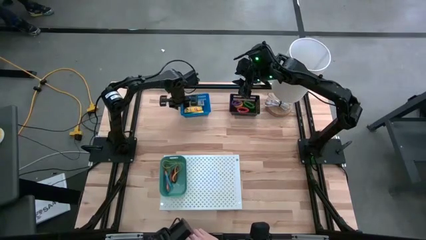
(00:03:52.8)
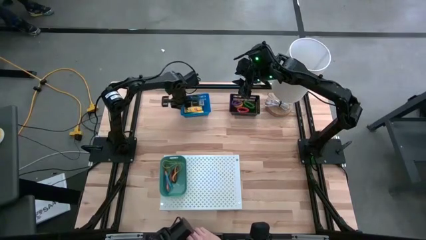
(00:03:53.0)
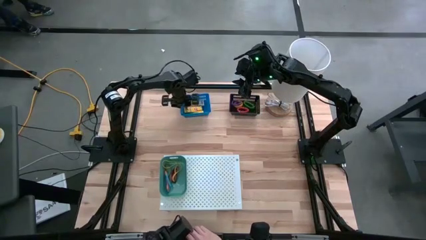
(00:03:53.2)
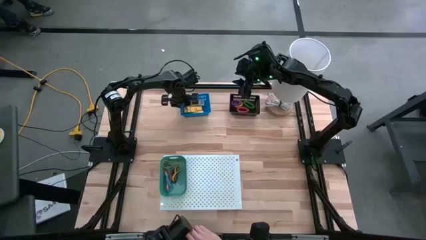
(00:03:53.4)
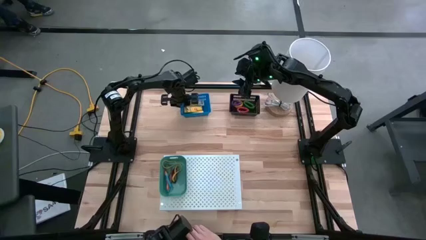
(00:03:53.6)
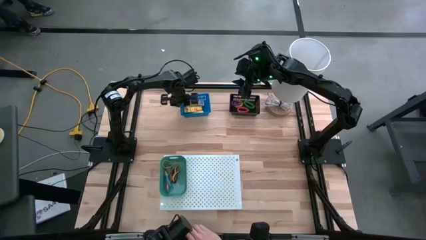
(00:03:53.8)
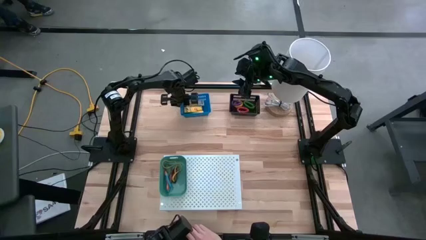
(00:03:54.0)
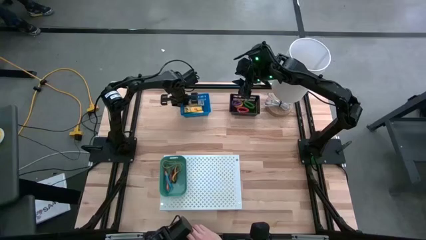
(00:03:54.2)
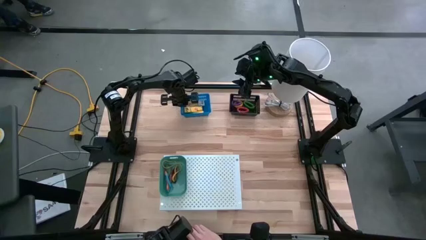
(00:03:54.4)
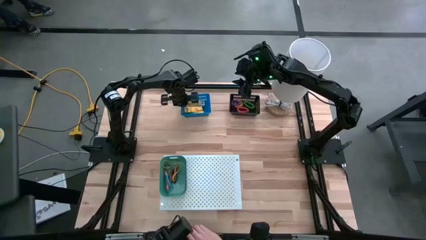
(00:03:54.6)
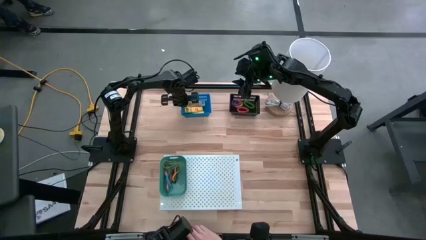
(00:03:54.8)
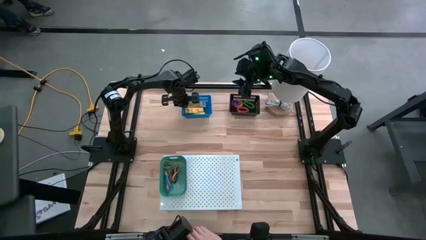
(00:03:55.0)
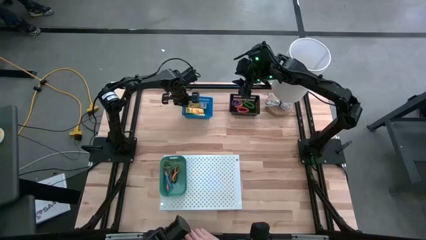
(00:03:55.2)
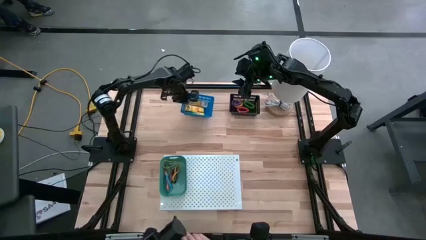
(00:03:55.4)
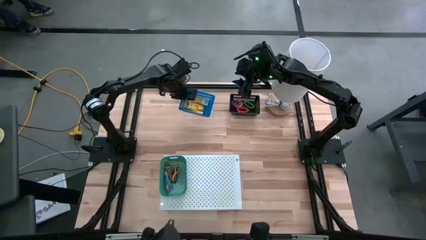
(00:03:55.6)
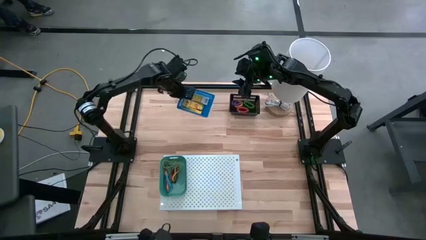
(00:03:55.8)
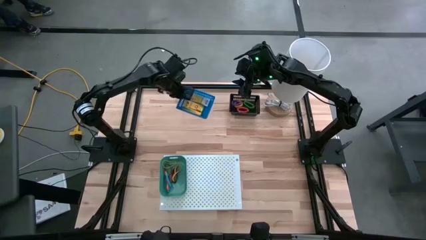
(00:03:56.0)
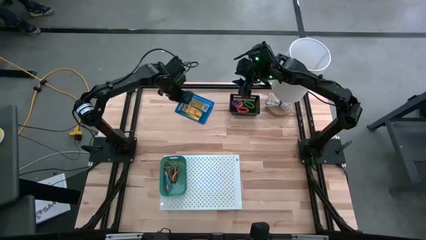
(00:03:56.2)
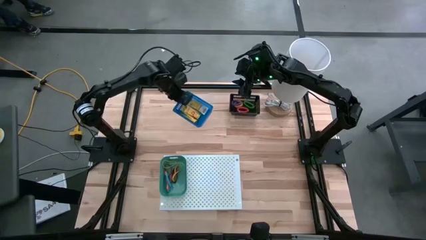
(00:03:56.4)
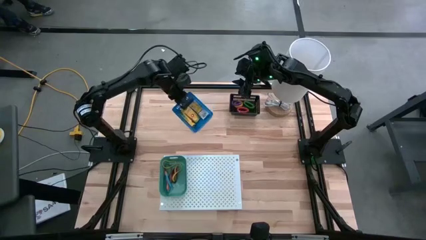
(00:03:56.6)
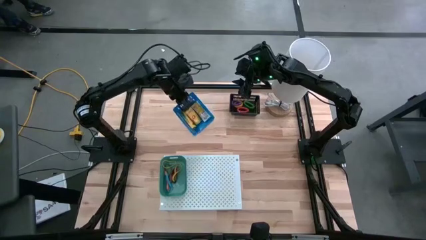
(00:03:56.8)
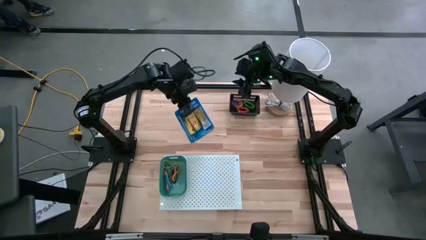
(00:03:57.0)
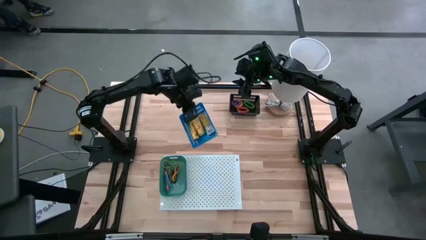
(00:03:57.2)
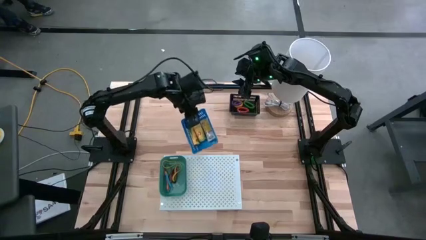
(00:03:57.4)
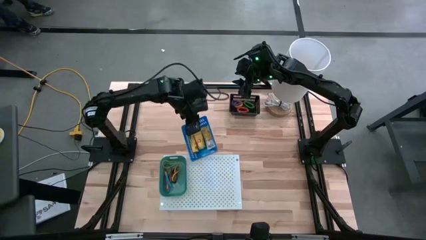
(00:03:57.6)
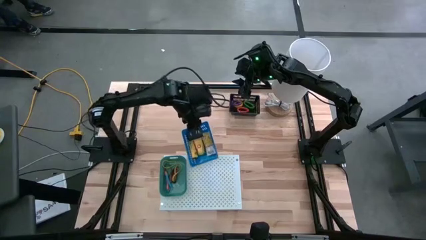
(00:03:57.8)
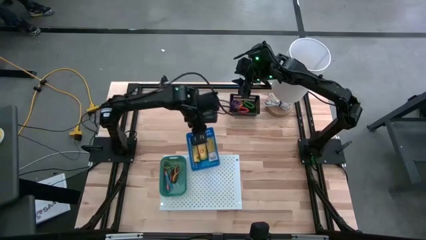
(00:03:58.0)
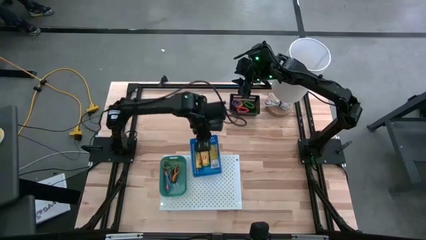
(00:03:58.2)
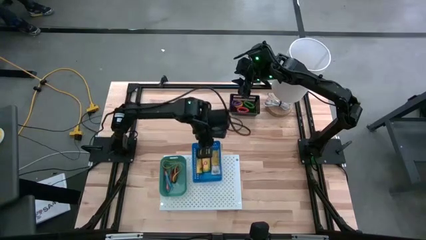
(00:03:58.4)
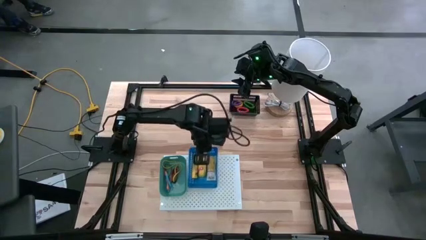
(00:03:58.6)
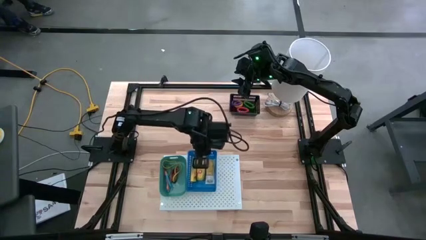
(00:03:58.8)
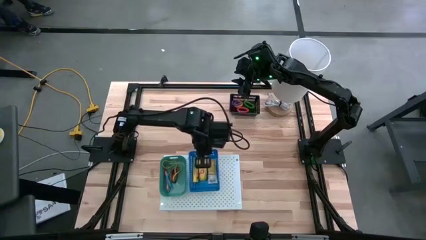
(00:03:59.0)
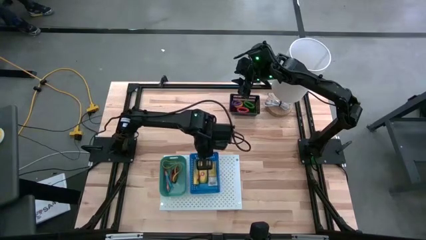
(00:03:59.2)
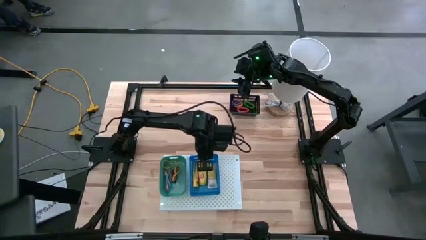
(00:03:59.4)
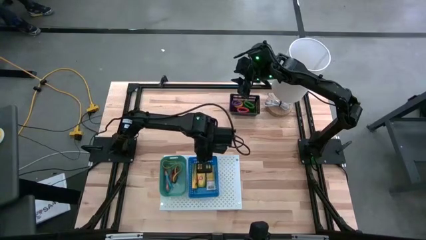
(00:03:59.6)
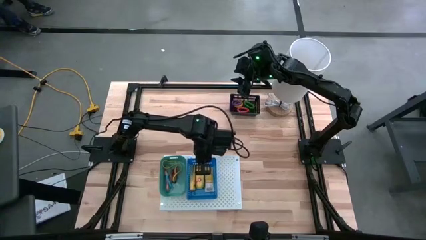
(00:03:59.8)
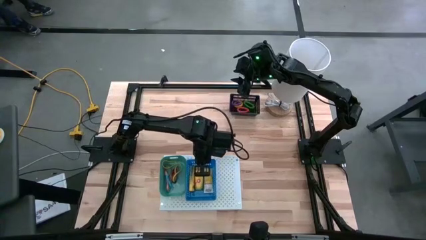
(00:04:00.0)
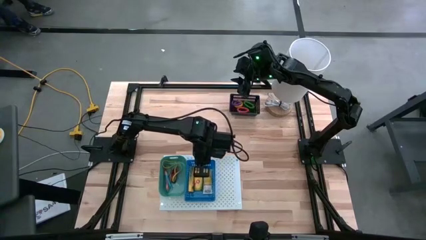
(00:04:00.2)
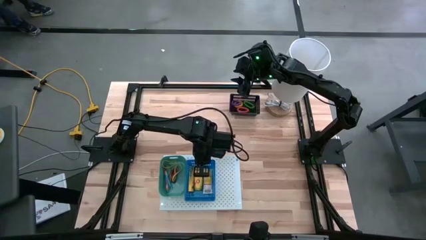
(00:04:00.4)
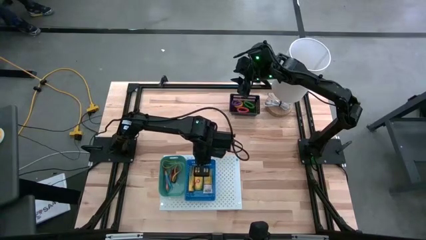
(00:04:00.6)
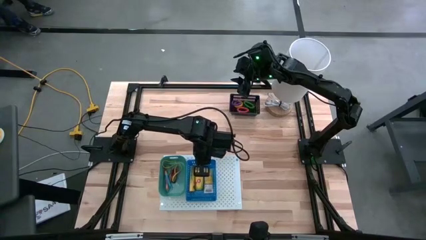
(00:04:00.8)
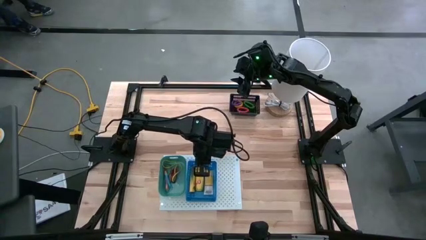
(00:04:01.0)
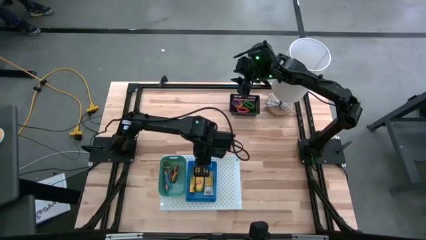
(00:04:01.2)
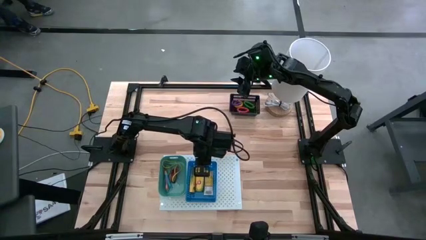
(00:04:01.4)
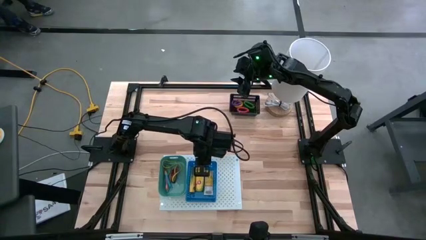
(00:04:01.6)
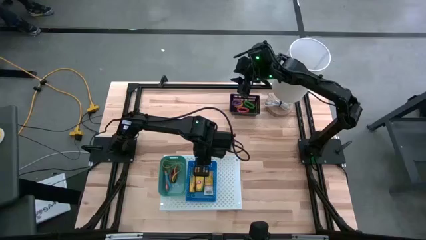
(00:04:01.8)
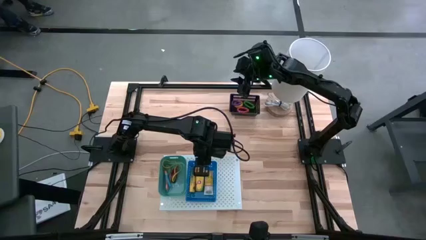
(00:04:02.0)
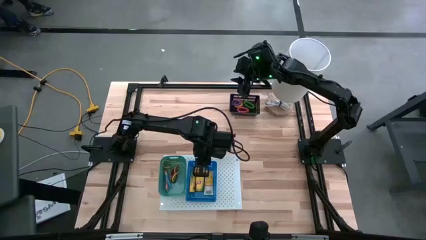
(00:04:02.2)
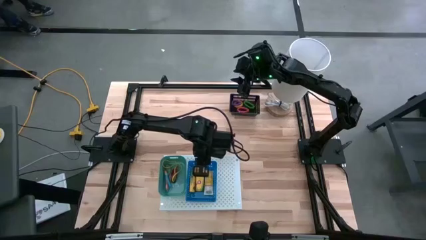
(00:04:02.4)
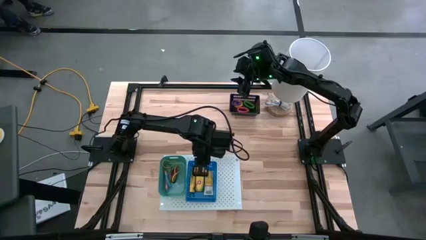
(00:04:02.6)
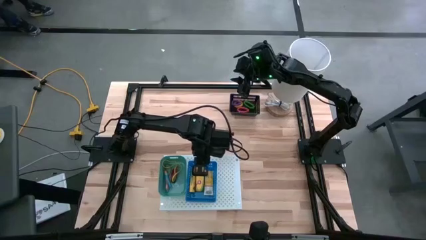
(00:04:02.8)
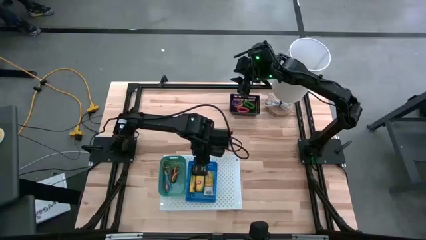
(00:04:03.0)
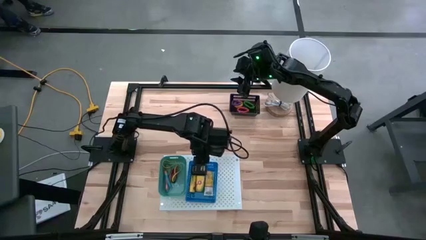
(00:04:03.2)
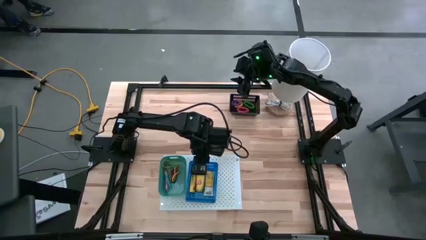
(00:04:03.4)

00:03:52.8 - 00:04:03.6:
Task: Pick & Place Office Desk Supplies
Put the blue bin on the shelf
